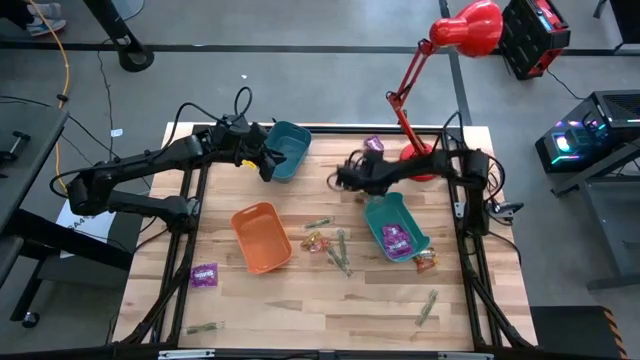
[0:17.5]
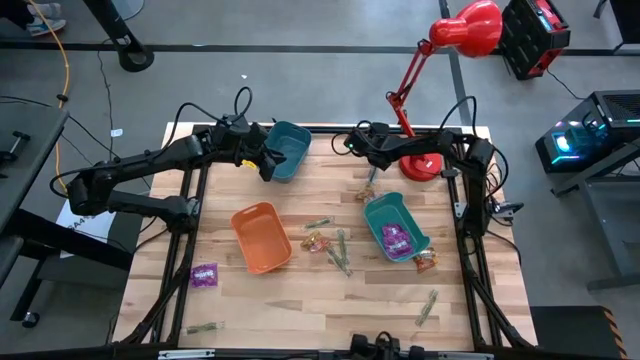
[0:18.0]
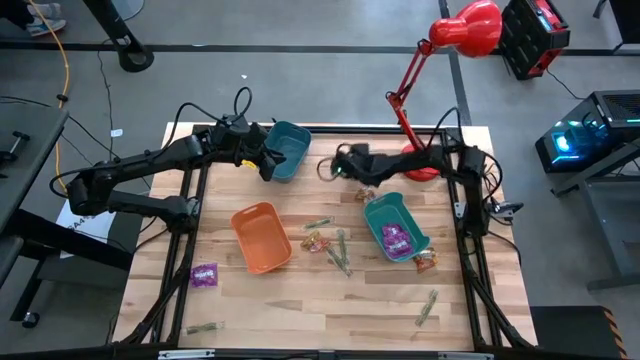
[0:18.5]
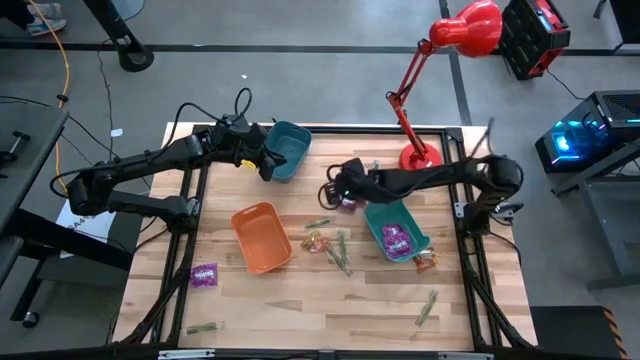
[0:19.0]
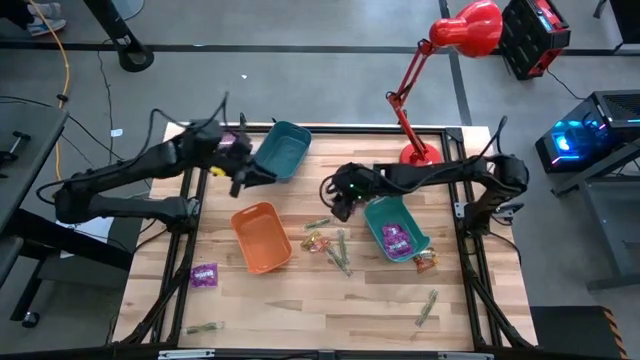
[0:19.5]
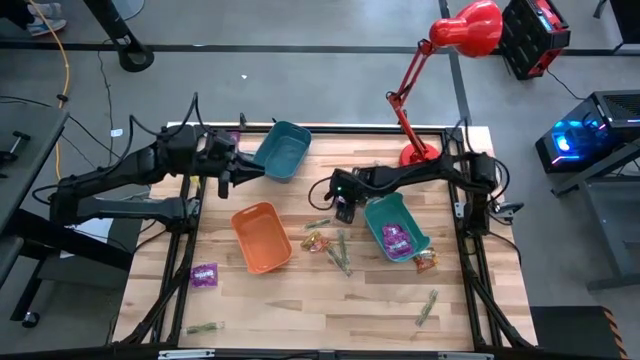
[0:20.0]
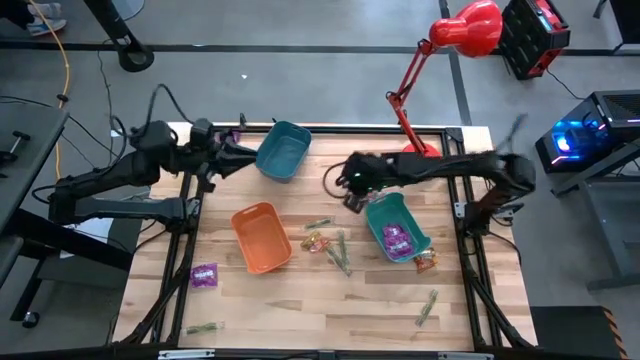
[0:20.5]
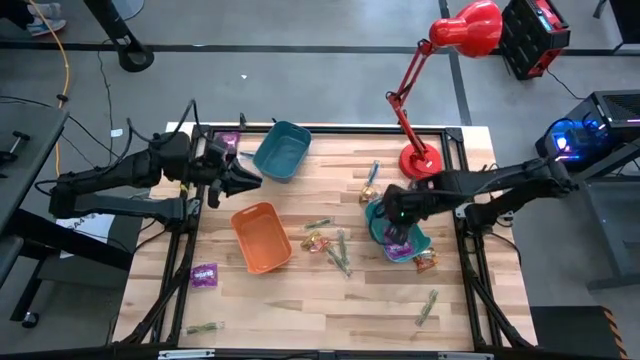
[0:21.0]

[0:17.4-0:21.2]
Task: Sort candy
Put the purple candy into the green bin

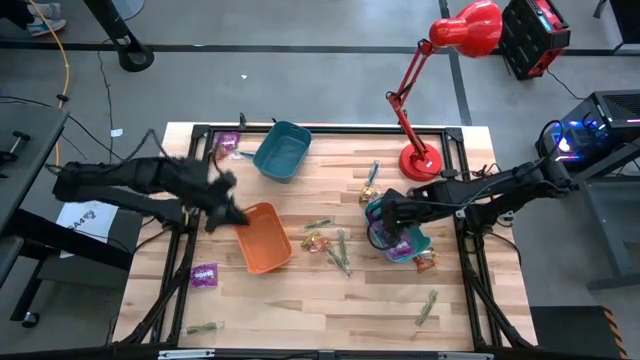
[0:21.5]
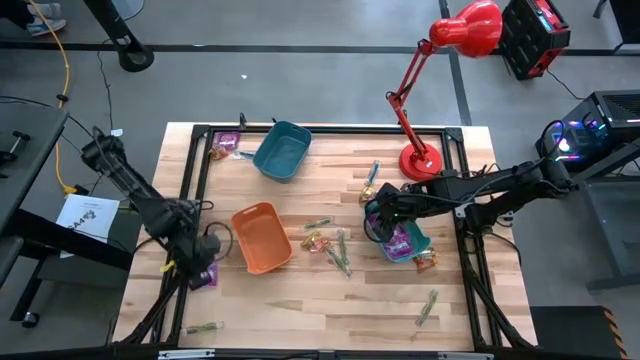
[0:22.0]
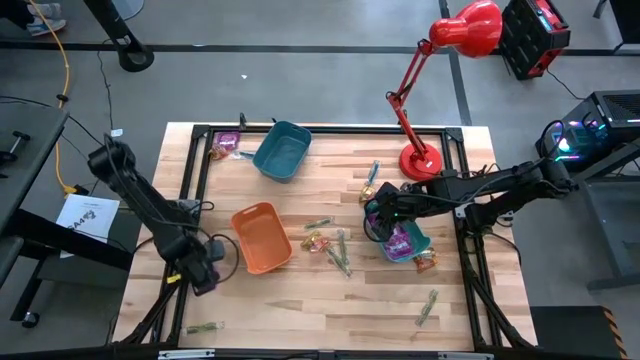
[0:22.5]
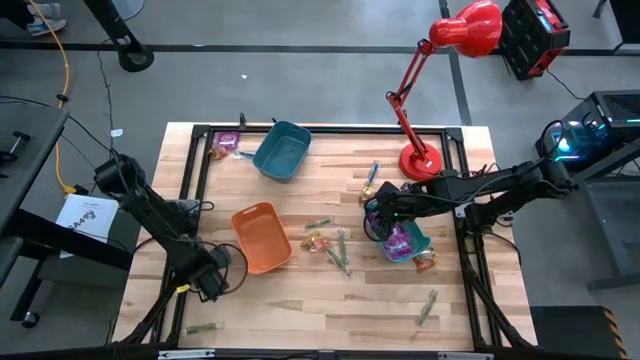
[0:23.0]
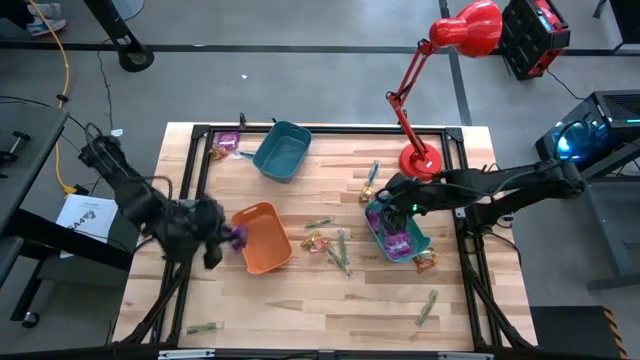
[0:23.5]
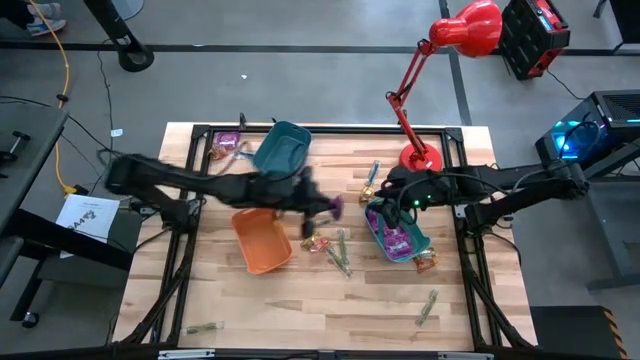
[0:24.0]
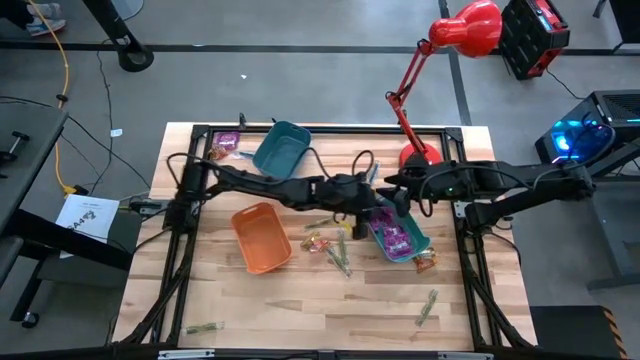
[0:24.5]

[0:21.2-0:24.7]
Put the purple candy into the green bin

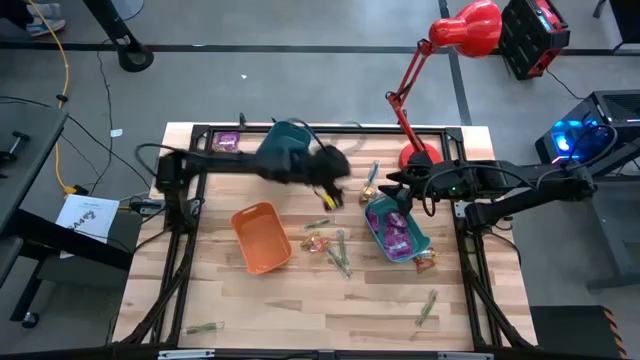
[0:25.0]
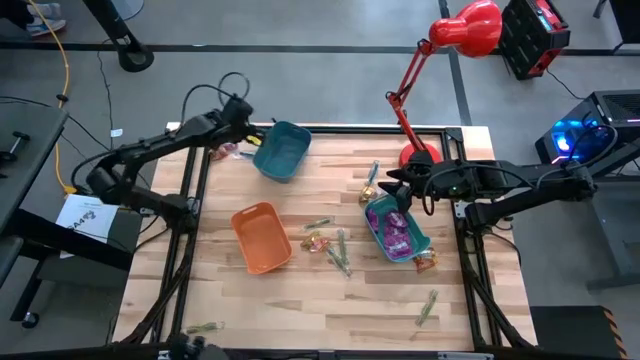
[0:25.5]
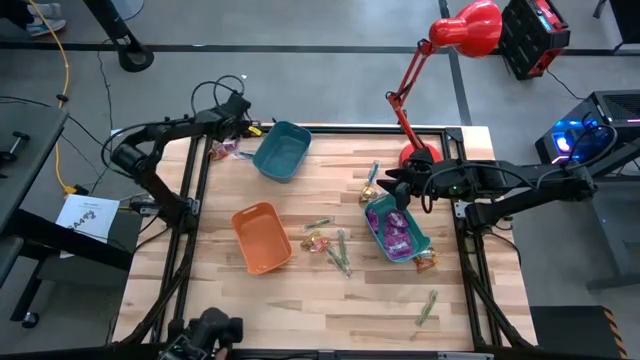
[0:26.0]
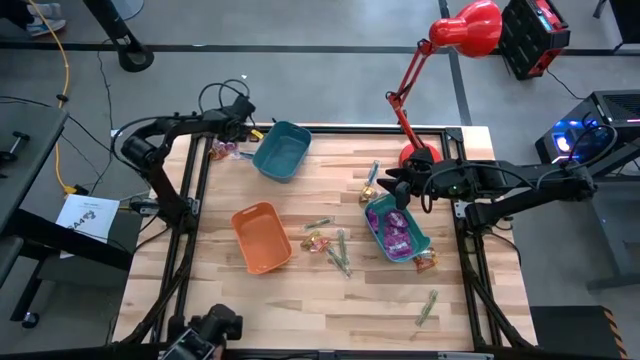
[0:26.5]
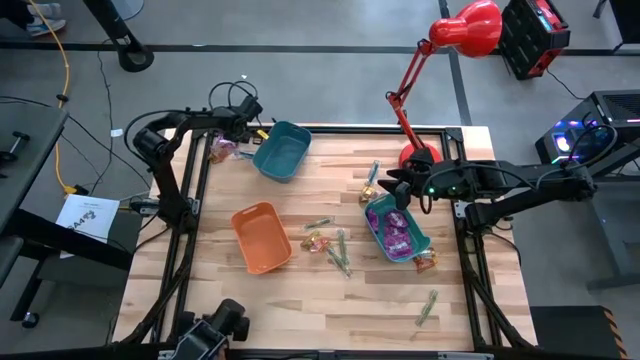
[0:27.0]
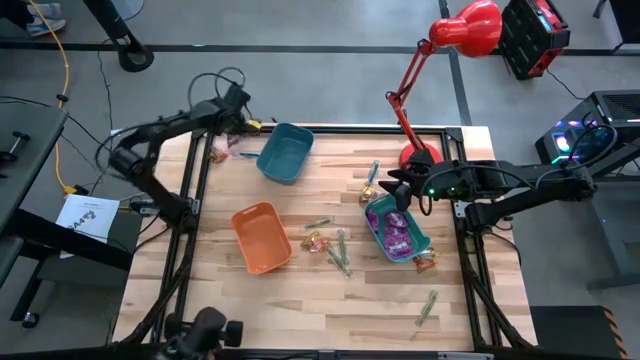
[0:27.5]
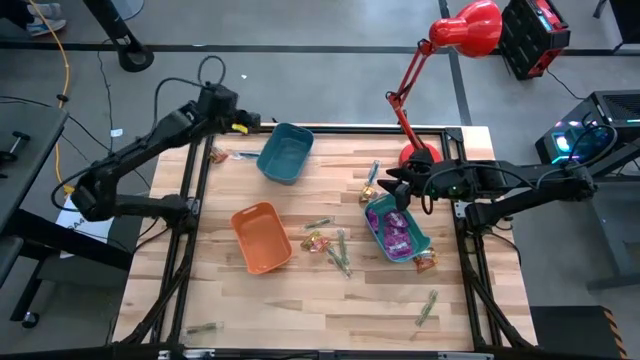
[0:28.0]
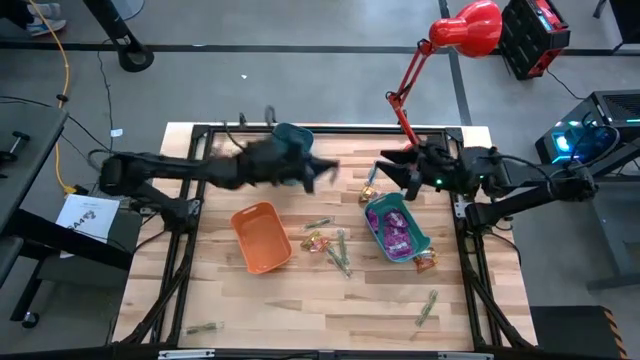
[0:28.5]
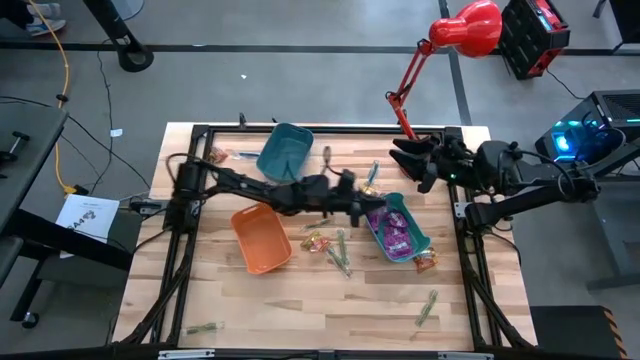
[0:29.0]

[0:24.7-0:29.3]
Put the purple candy into the green bin

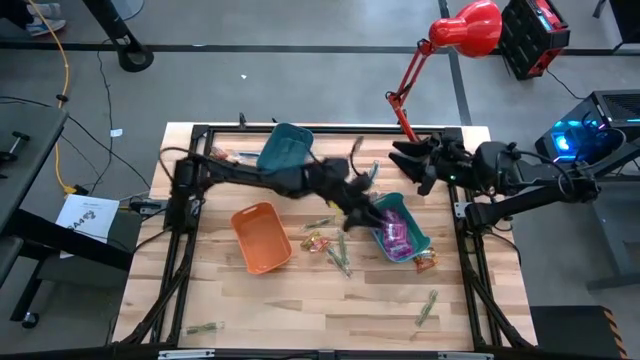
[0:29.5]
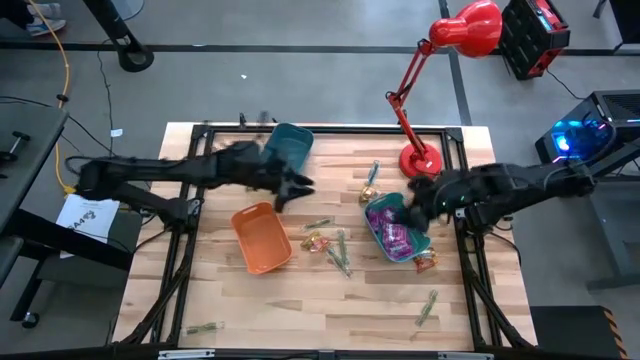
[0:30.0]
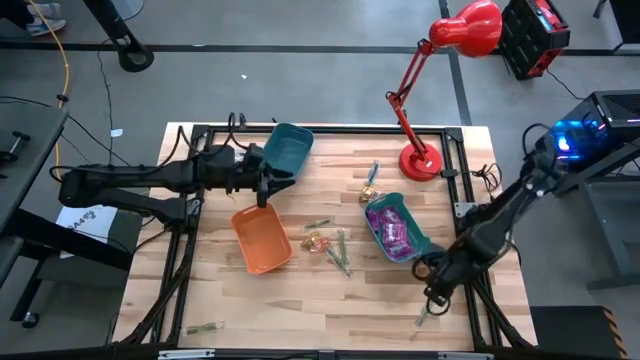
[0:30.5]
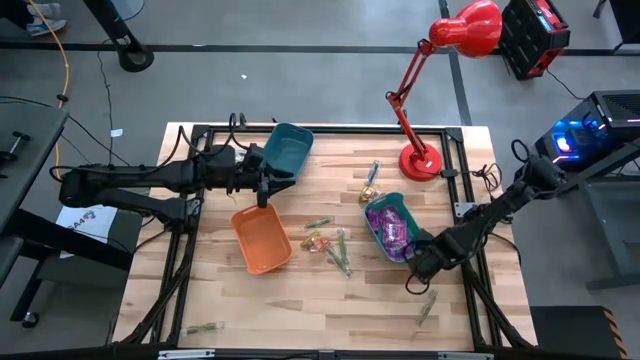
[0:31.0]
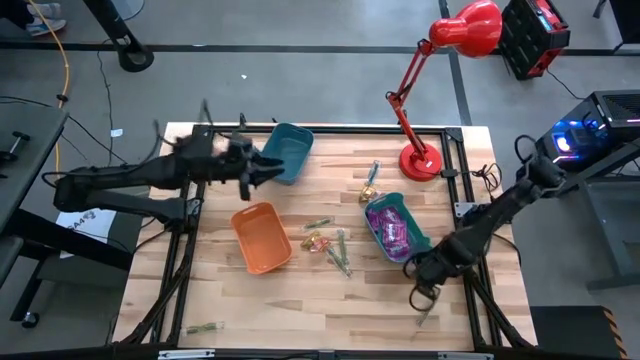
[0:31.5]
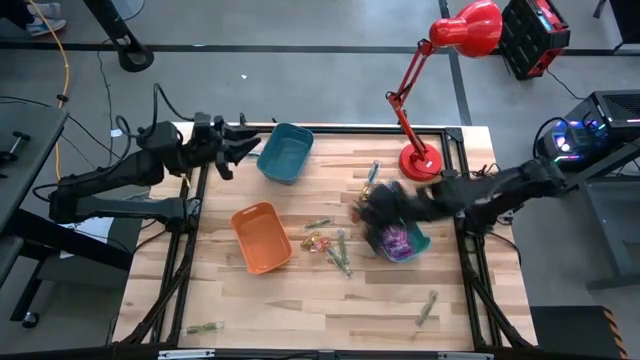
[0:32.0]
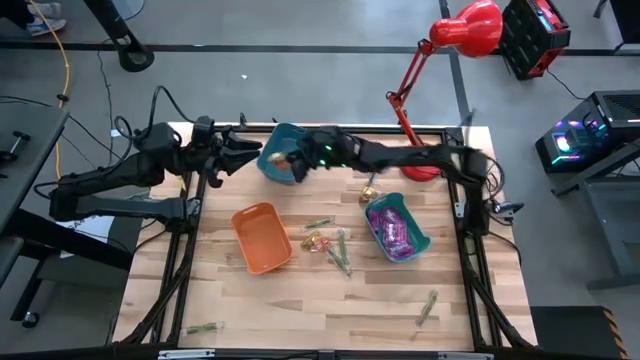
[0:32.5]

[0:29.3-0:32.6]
Put the gold gummy into the blue bin

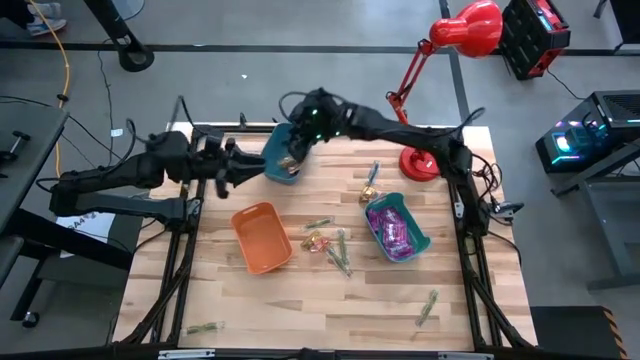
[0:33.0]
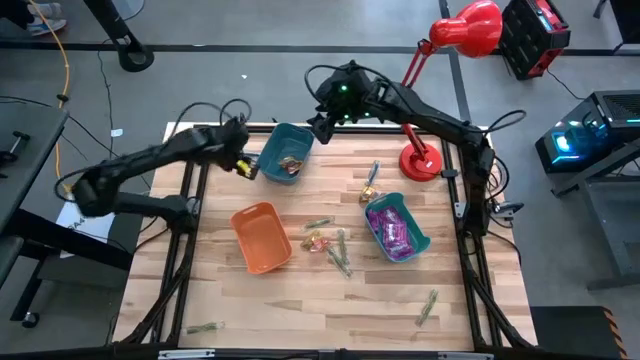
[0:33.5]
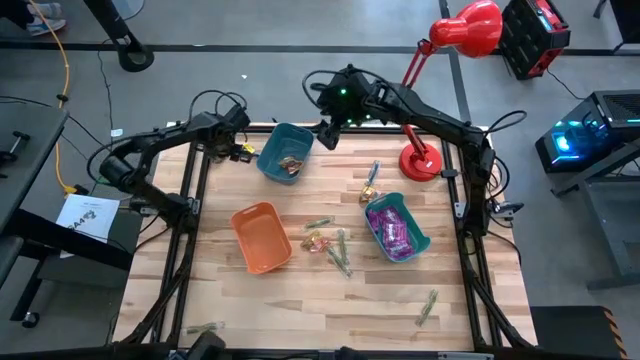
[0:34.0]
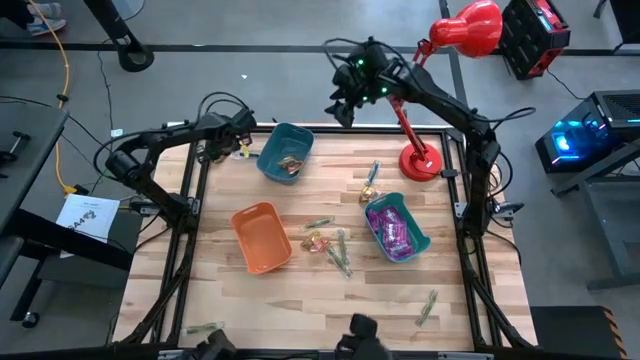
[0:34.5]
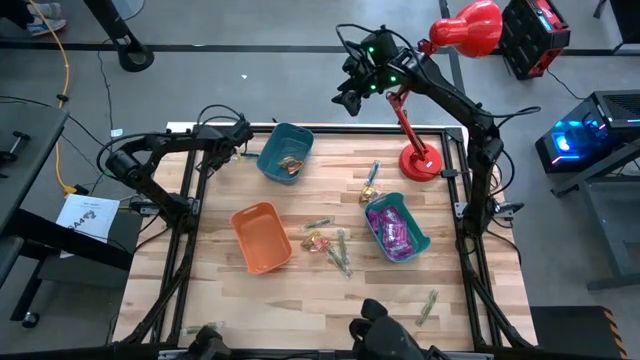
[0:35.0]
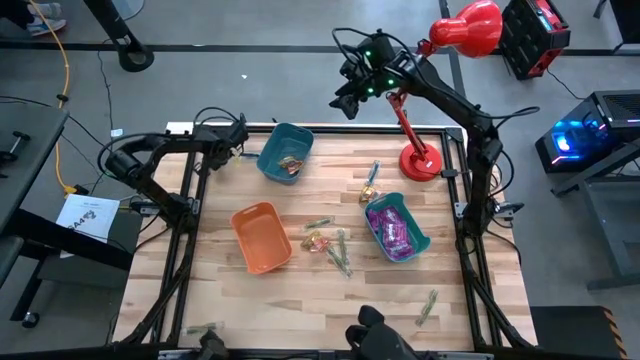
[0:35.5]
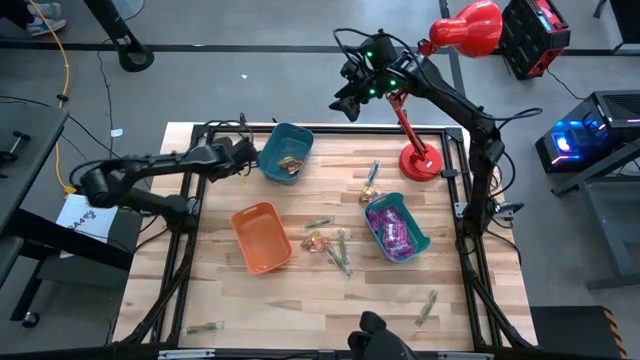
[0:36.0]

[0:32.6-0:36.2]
Put the gold gummy into the blue bin

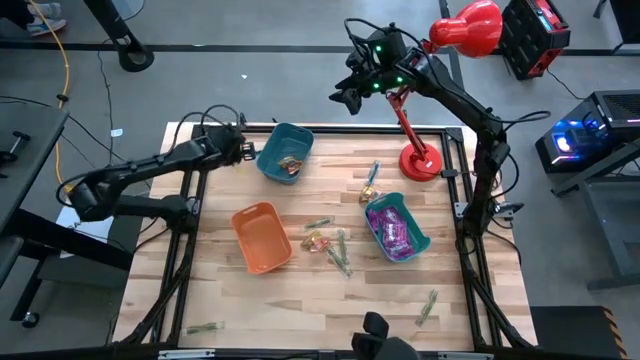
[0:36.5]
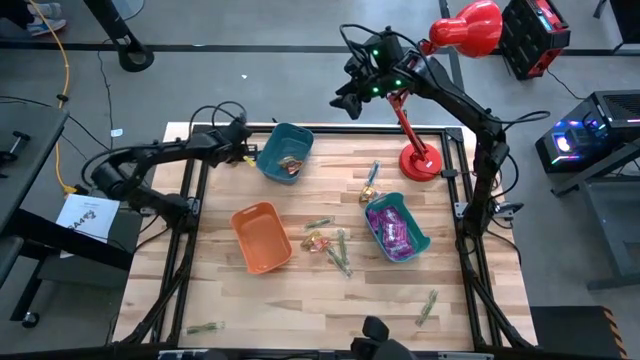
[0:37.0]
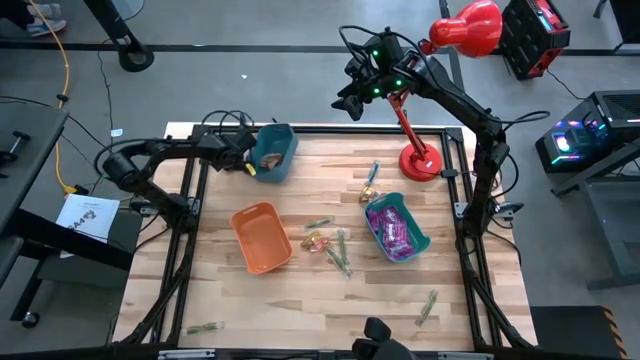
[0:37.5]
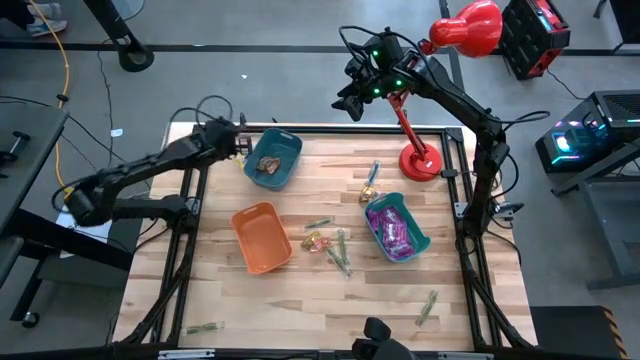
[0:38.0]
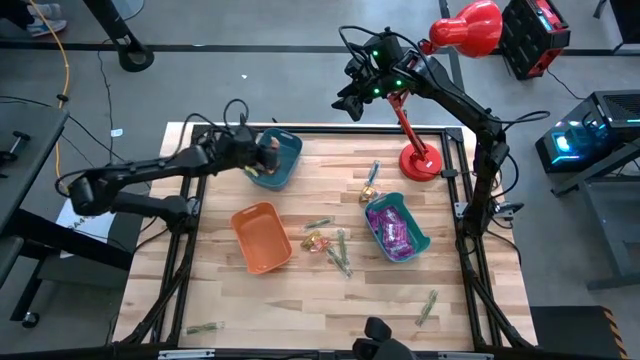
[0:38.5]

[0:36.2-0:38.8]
Put the gold gummy into the blue bin

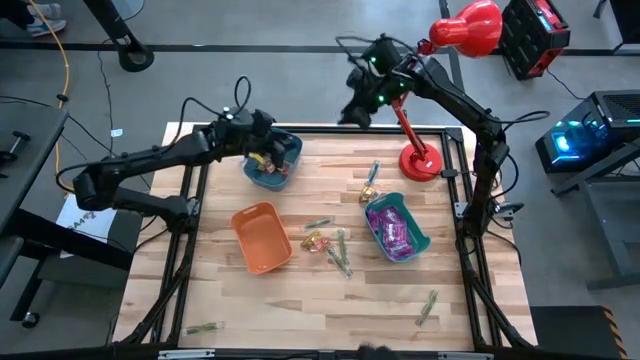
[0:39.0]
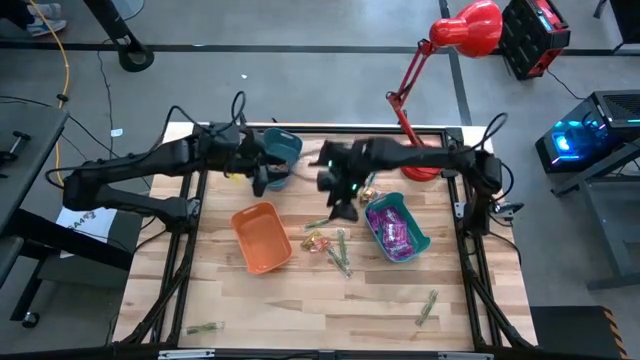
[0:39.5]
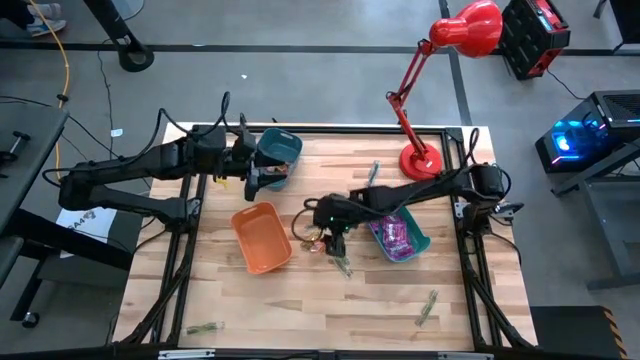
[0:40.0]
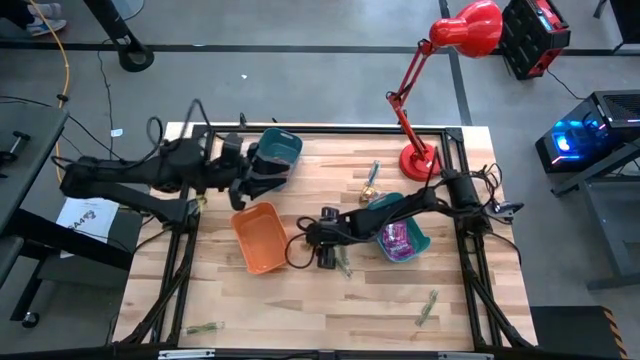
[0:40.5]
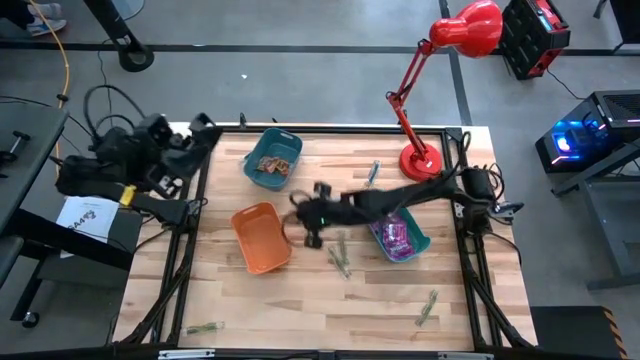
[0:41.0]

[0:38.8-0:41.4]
Put the gold gummy into the blue bin
